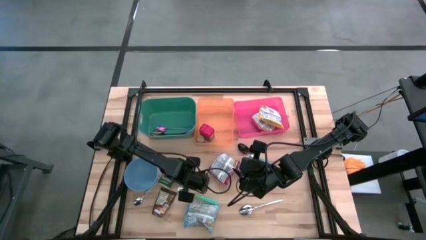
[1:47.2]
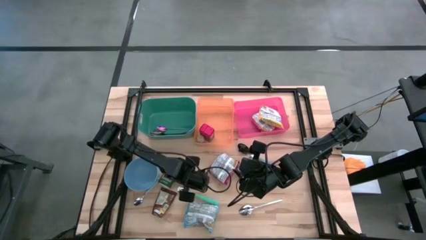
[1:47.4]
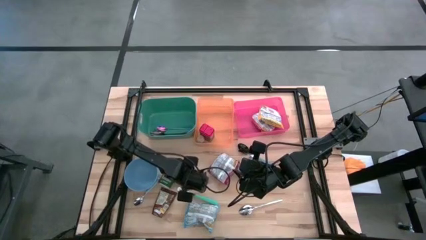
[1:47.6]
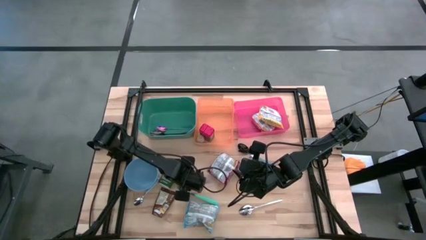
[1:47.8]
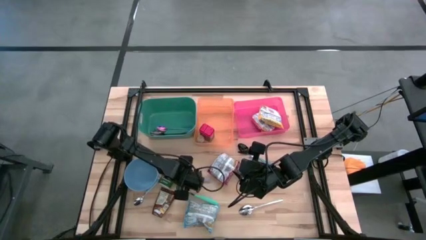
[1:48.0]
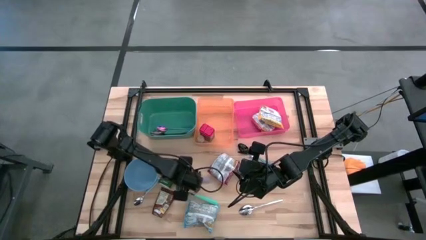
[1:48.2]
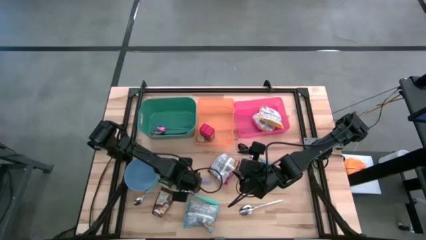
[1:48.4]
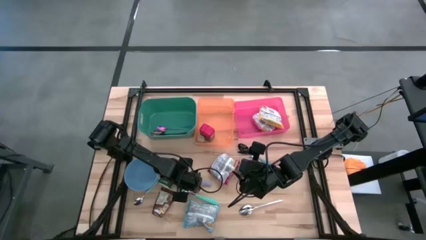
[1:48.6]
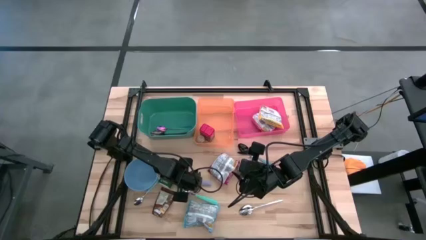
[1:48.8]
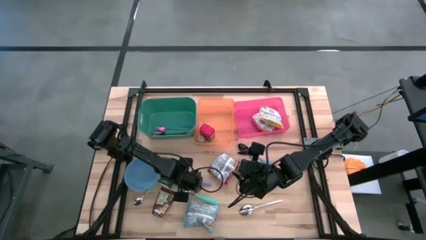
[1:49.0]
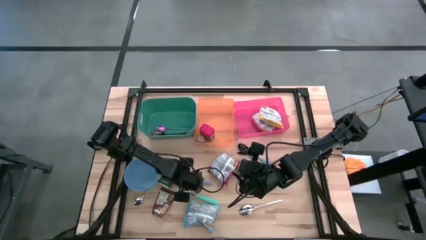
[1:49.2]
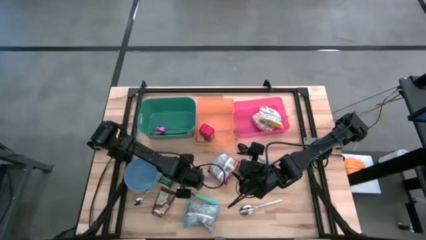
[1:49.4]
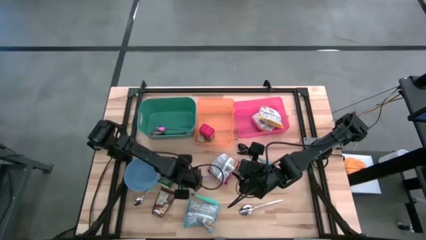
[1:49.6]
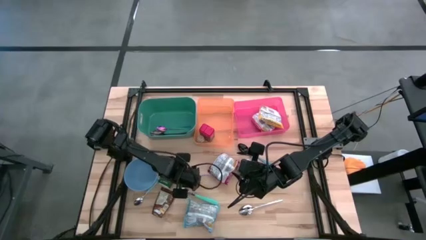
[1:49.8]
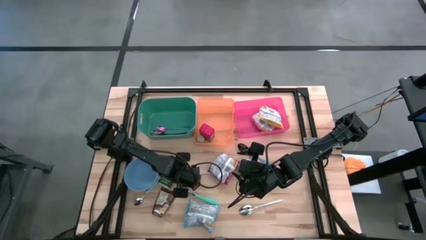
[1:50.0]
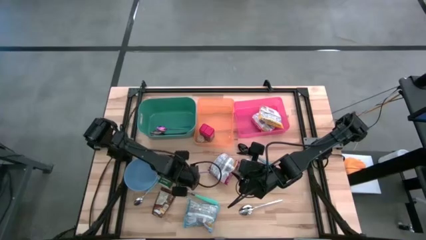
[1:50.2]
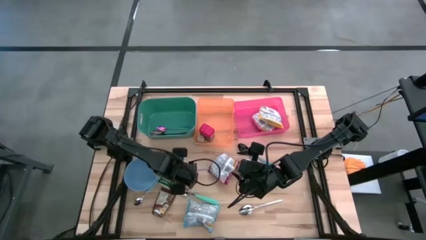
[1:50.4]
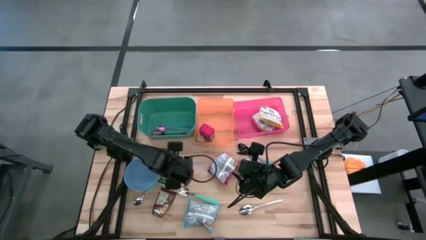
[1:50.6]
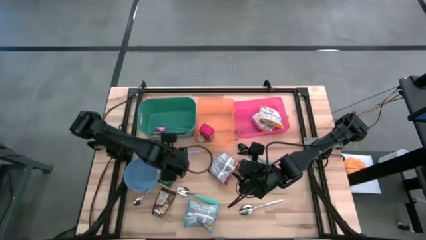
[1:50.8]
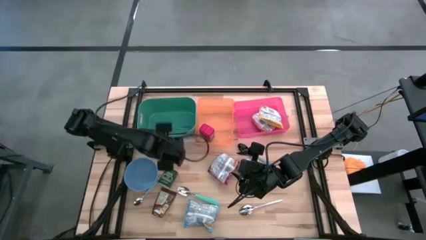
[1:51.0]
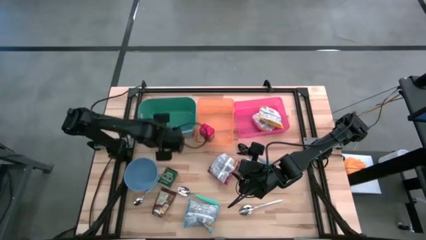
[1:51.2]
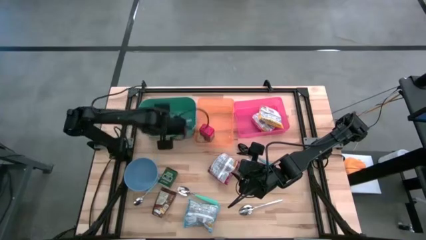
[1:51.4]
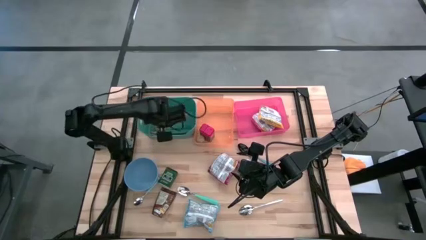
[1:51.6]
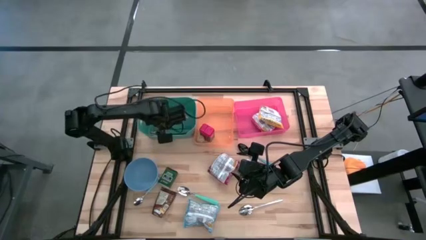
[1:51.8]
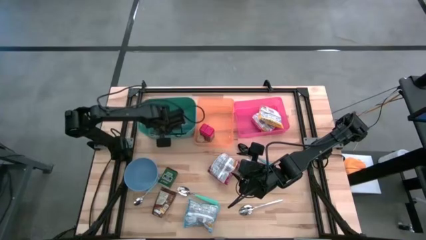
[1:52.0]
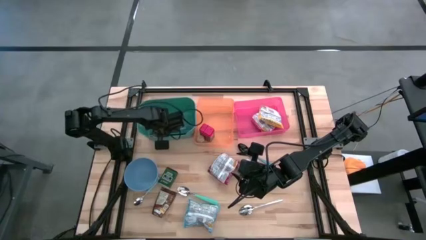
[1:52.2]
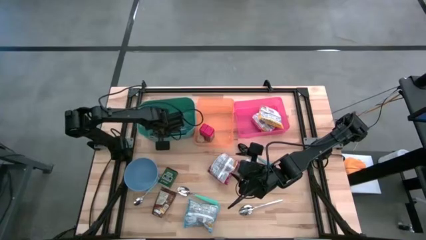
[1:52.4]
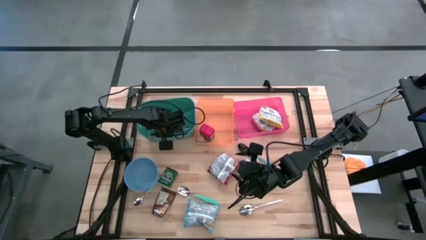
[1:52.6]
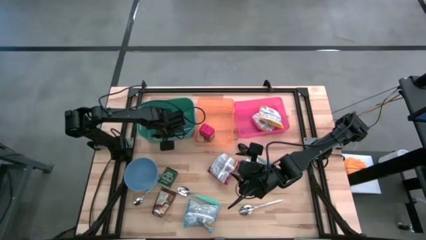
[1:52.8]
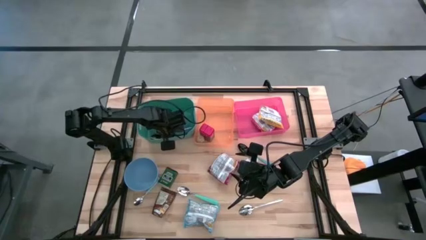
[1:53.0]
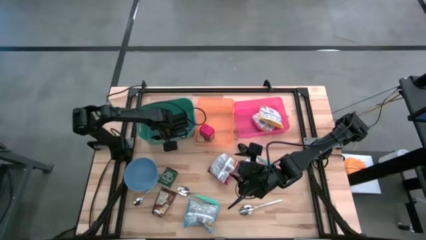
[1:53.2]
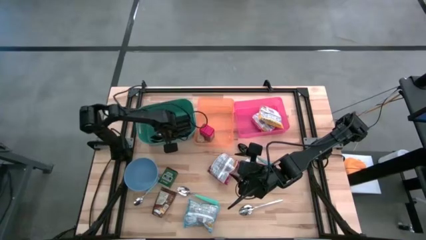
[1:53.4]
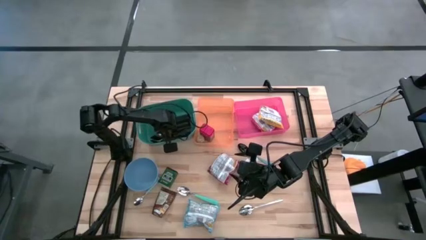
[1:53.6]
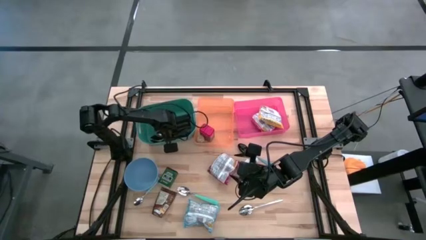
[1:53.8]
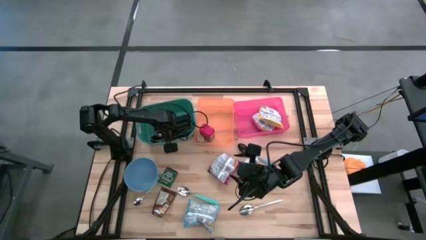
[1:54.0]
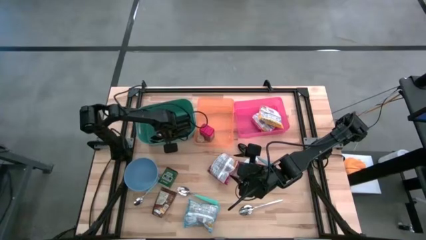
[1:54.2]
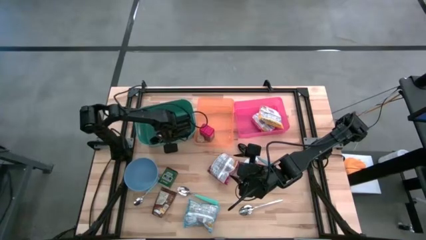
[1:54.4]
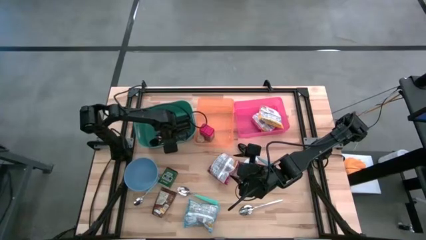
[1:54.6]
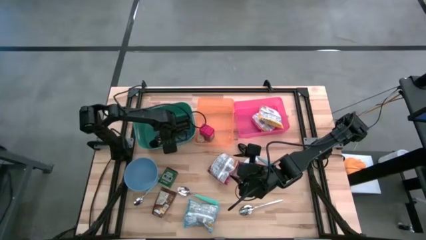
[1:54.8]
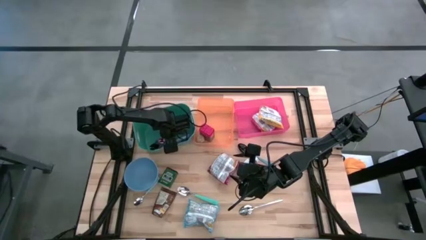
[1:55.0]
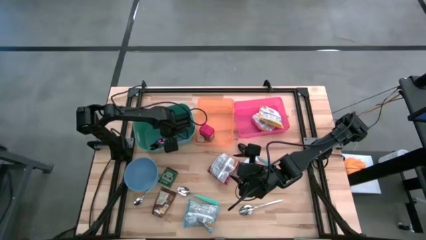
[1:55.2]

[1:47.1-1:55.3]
Put the violet spoon into the green bin

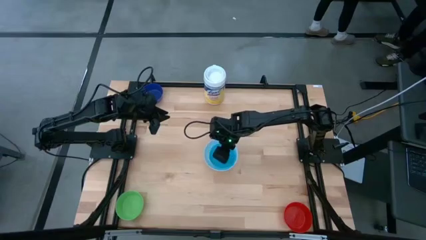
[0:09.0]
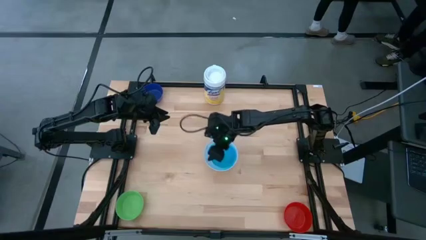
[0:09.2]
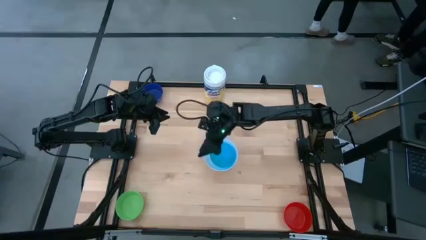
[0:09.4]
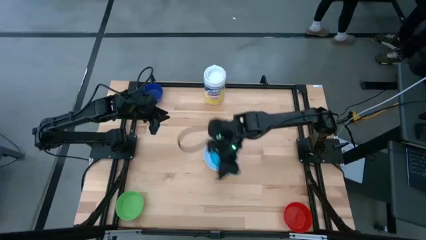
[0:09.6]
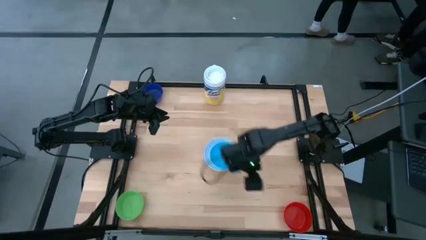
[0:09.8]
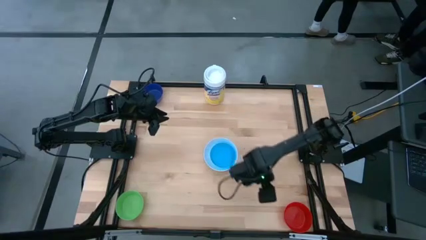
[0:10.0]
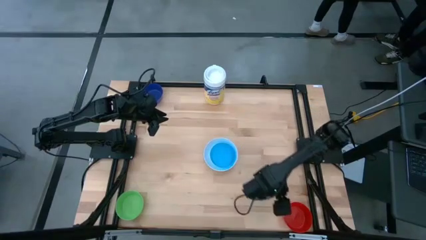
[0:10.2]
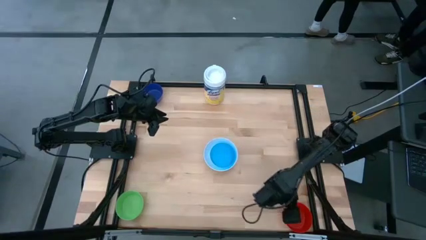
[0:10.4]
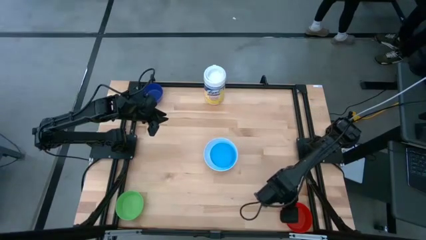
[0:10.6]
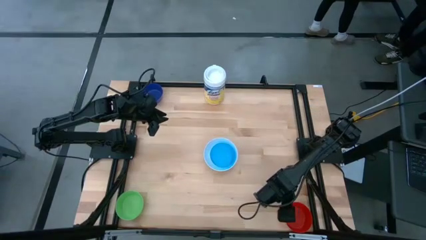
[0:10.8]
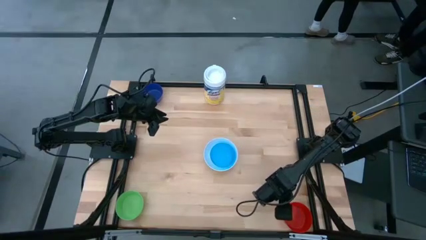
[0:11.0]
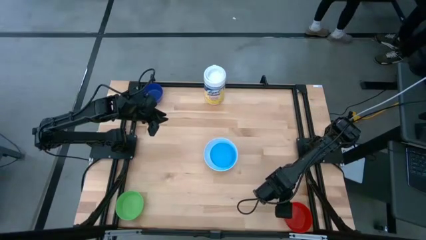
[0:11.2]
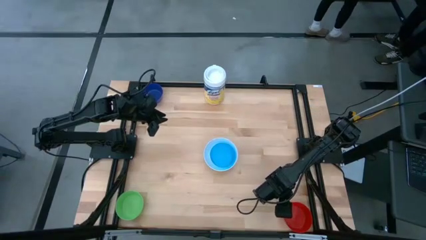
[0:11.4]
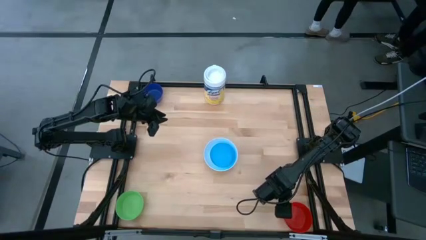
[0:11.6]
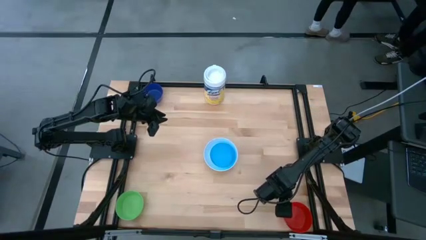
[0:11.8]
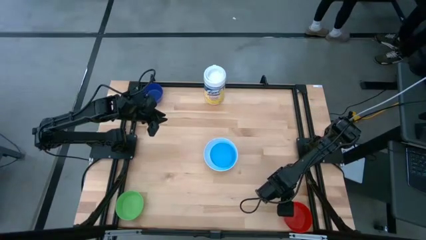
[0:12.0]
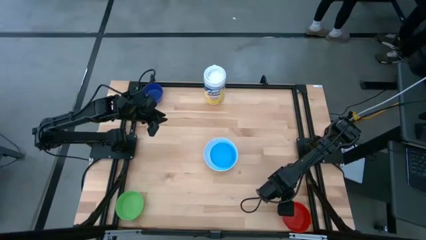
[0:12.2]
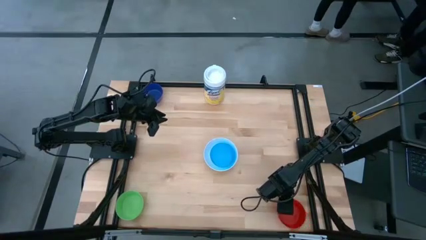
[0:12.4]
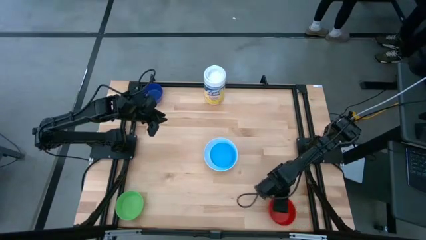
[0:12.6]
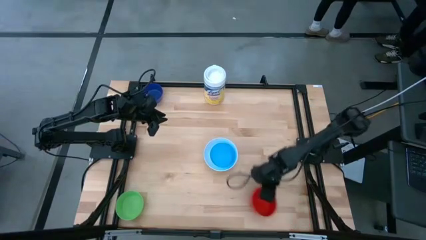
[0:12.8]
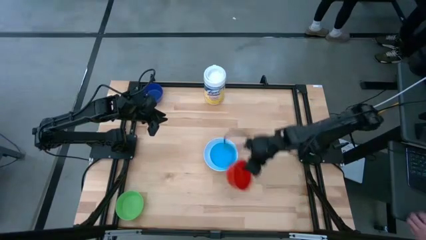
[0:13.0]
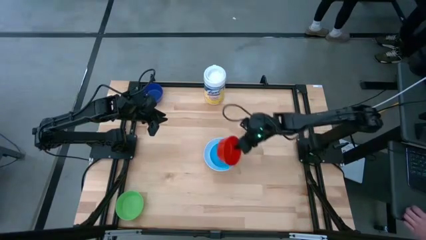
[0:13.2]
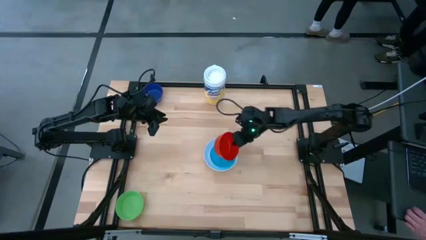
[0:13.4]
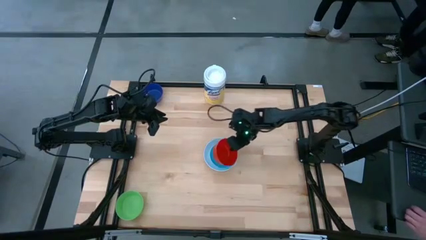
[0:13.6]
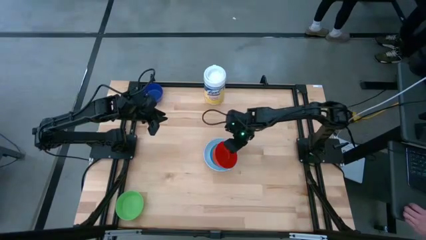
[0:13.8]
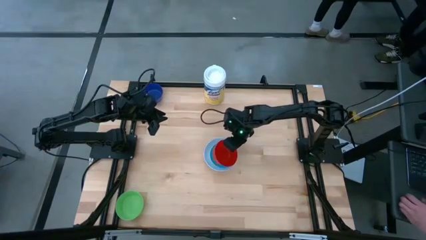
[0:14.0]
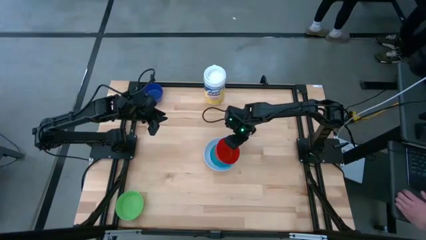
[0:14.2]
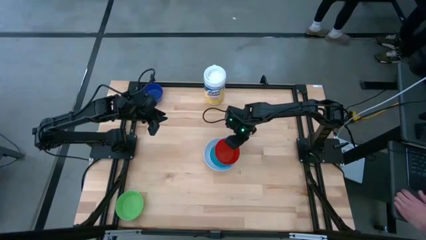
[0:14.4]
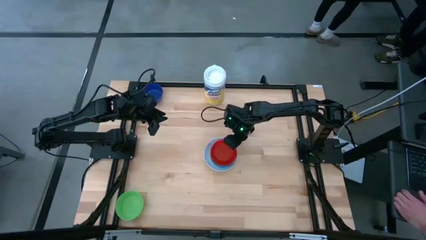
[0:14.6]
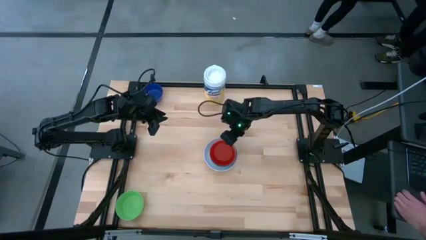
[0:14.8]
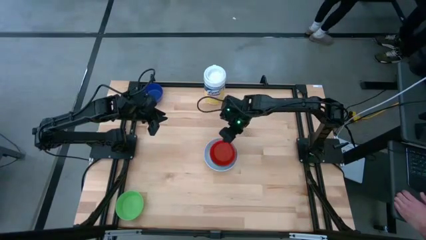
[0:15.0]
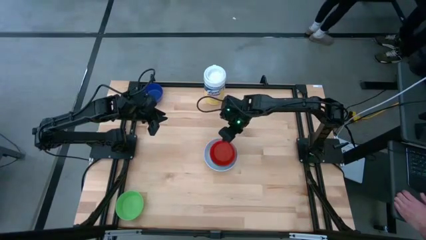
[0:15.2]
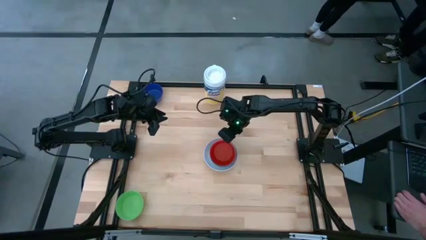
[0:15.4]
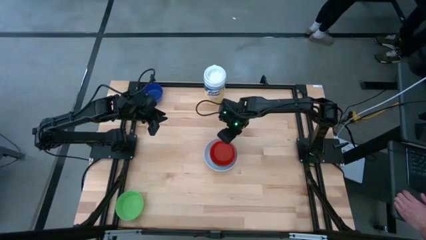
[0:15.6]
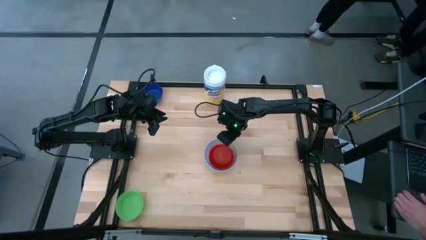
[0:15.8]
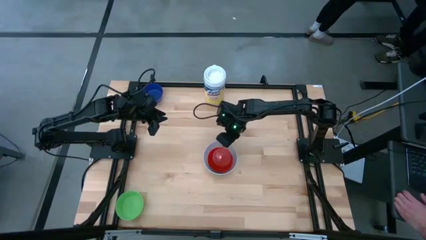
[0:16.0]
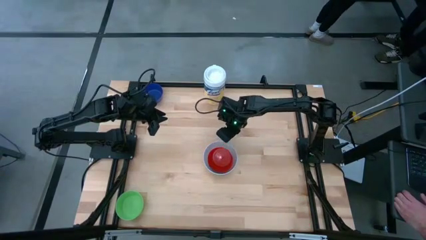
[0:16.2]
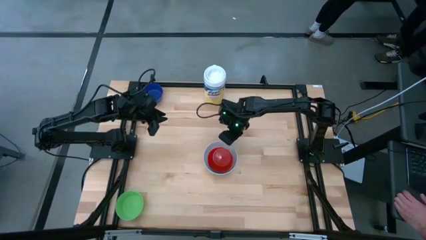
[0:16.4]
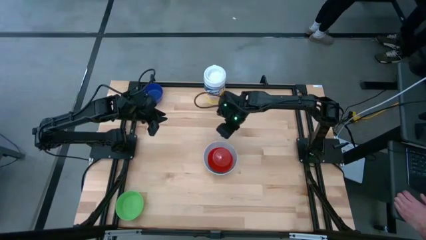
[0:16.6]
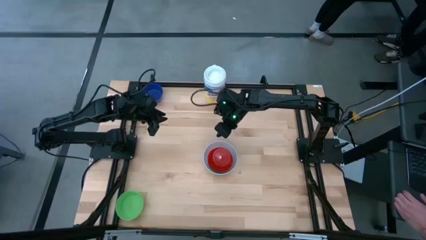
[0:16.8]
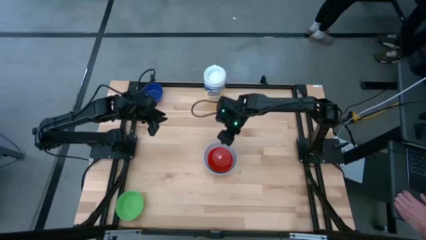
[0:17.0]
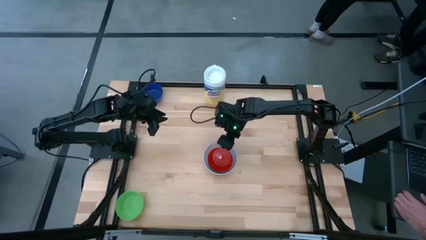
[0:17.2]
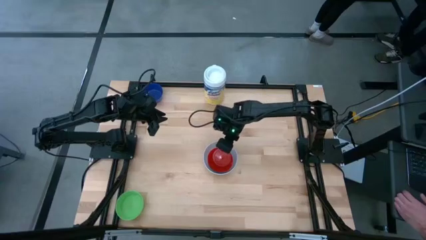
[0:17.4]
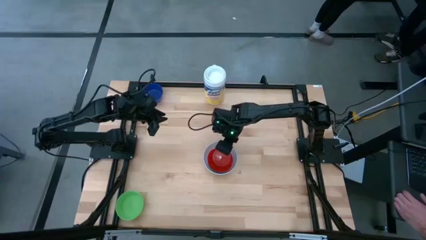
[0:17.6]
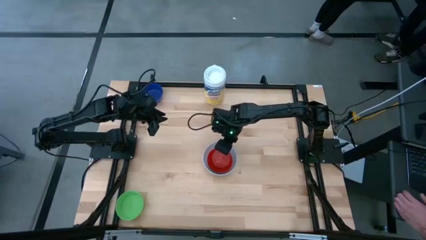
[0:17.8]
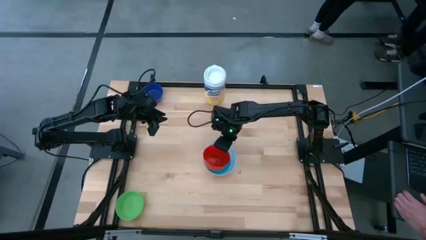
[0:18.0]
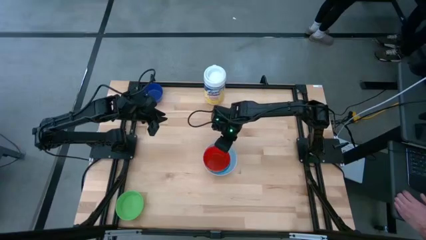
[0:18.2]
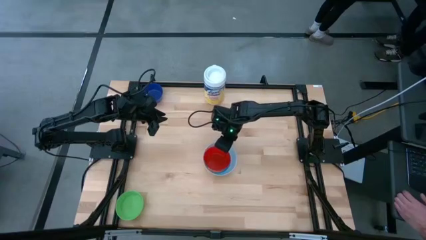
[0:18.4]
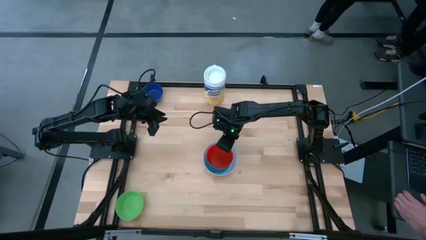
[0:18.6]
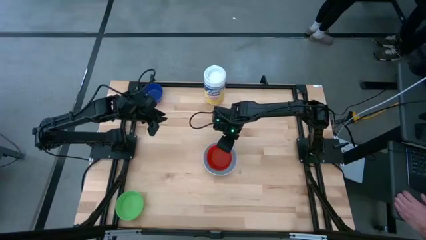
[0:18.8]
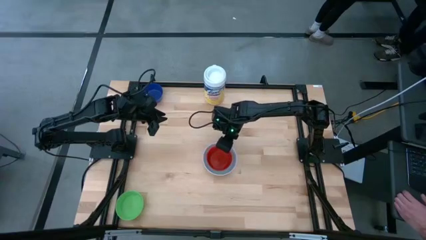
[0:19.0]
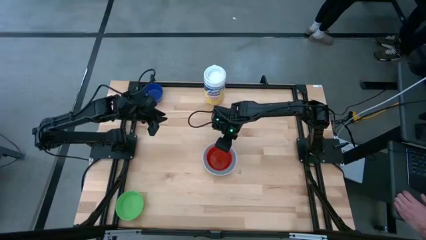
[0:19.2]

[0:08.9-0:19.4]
Stack the red bowl on top of the blue bowl
